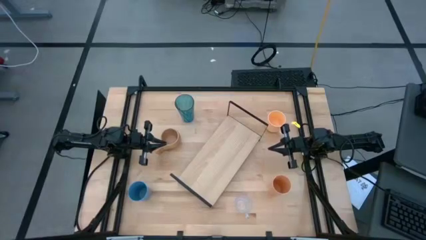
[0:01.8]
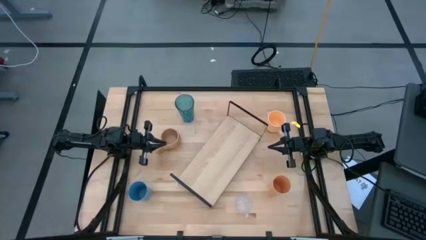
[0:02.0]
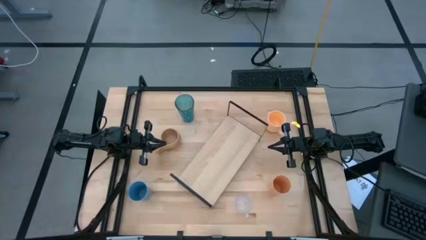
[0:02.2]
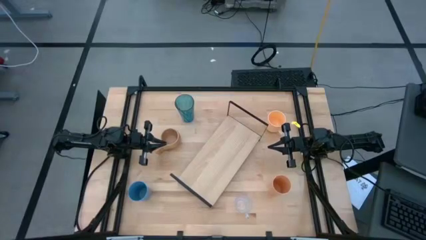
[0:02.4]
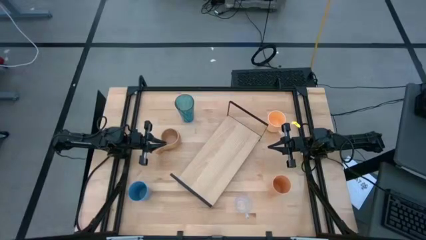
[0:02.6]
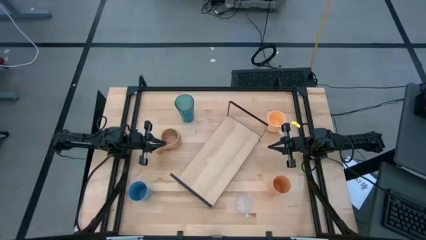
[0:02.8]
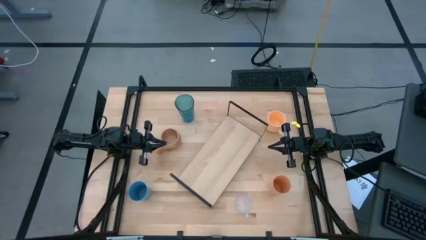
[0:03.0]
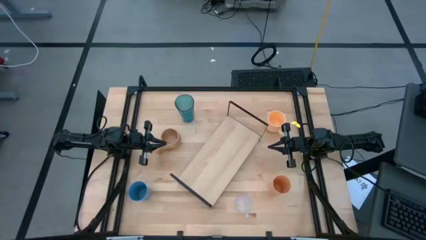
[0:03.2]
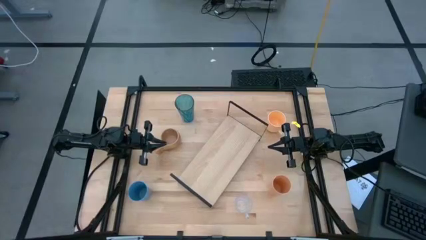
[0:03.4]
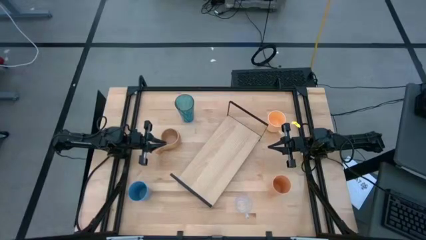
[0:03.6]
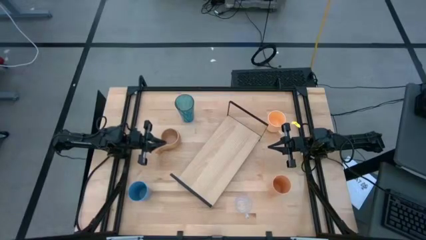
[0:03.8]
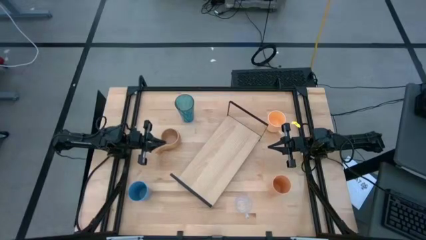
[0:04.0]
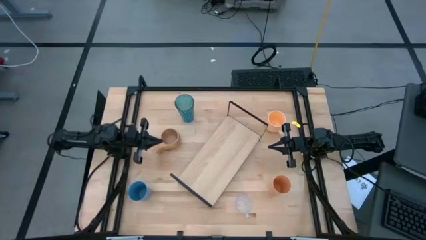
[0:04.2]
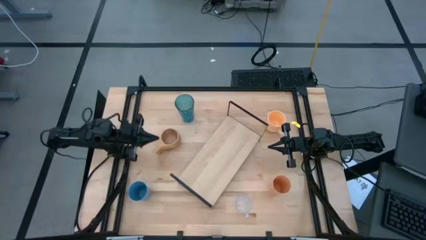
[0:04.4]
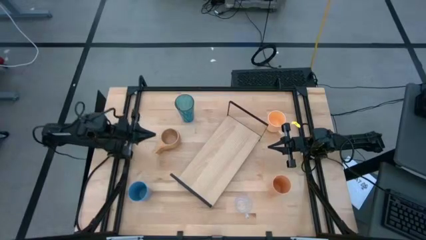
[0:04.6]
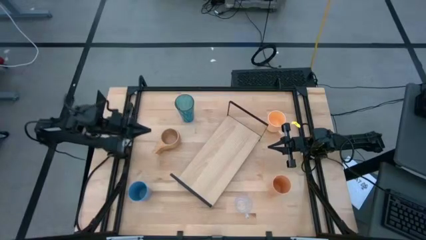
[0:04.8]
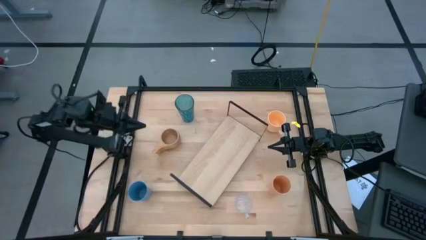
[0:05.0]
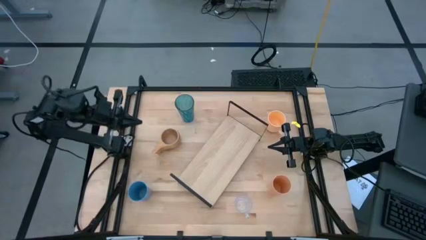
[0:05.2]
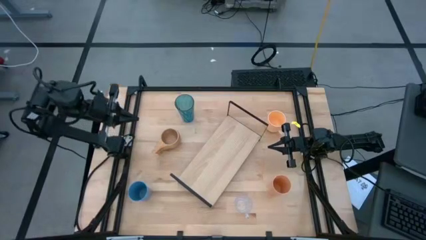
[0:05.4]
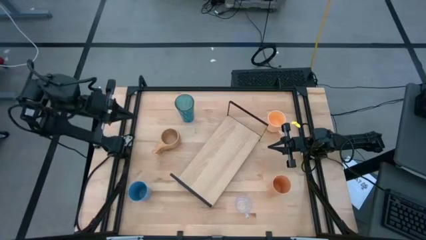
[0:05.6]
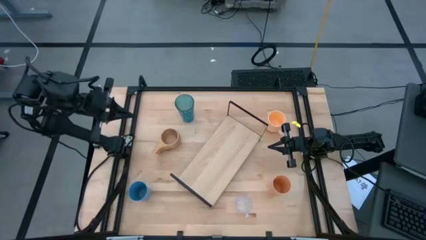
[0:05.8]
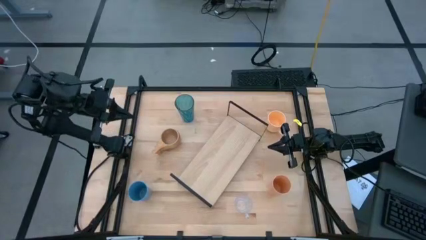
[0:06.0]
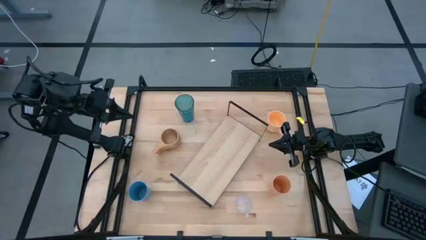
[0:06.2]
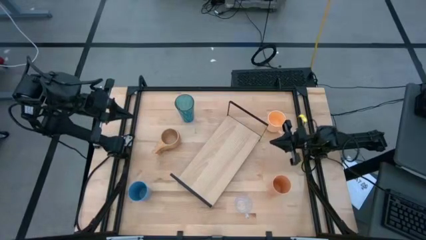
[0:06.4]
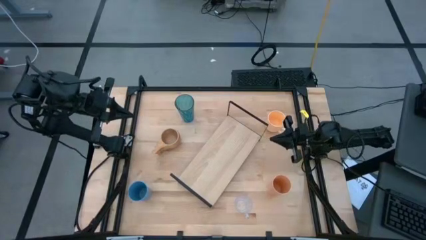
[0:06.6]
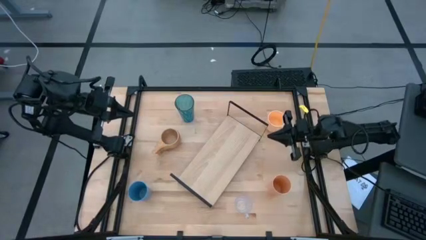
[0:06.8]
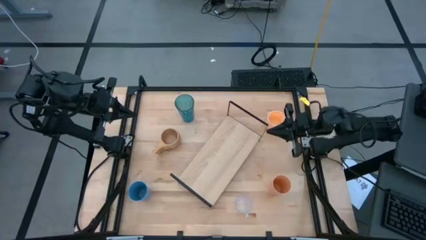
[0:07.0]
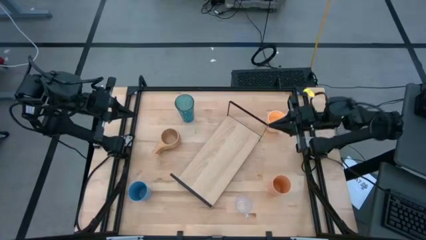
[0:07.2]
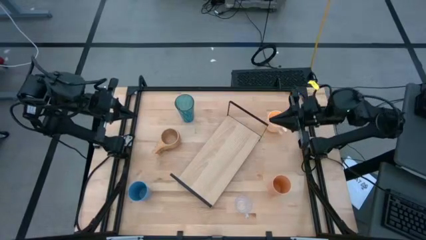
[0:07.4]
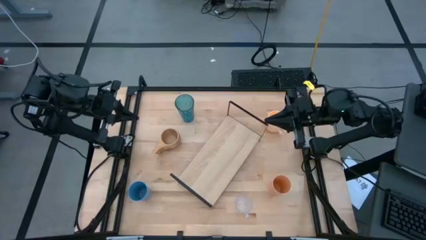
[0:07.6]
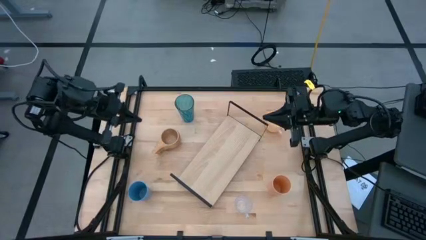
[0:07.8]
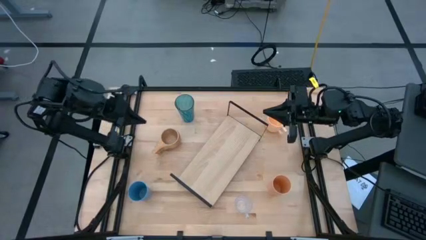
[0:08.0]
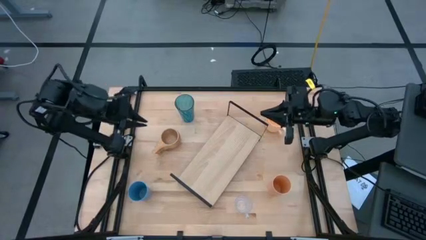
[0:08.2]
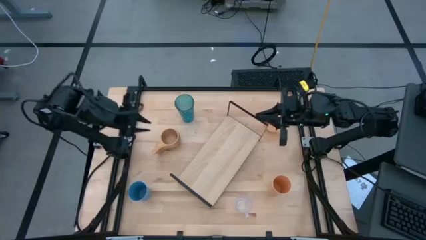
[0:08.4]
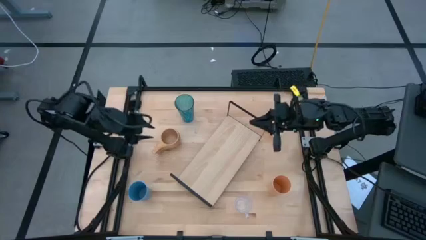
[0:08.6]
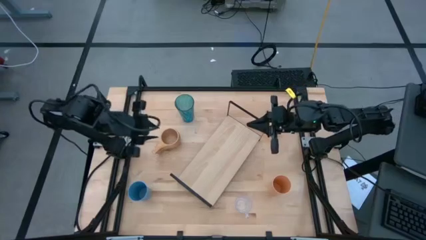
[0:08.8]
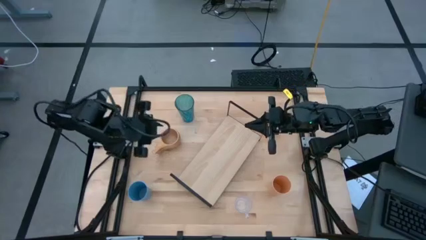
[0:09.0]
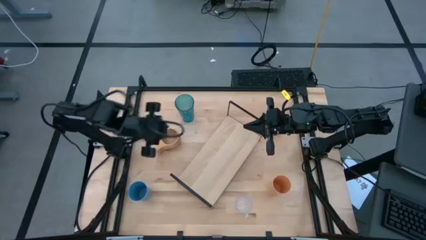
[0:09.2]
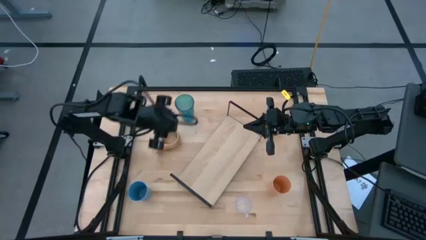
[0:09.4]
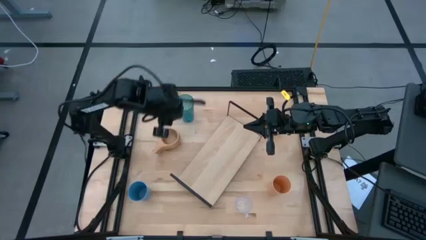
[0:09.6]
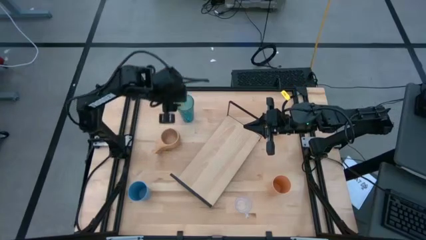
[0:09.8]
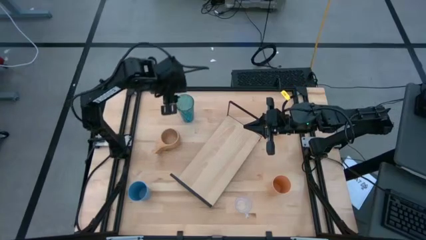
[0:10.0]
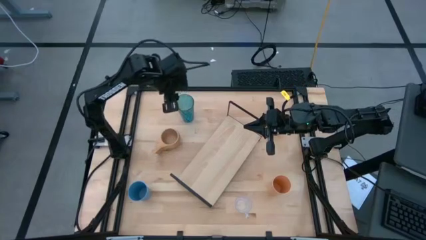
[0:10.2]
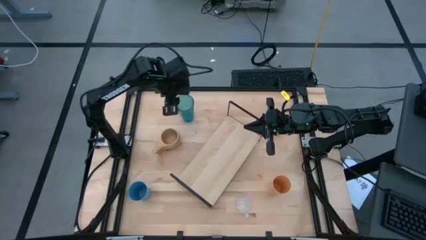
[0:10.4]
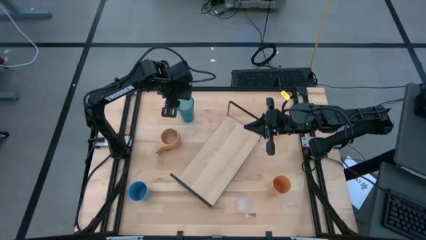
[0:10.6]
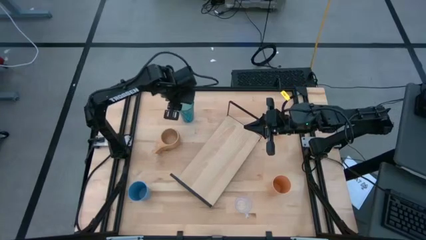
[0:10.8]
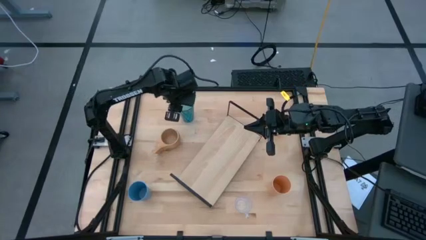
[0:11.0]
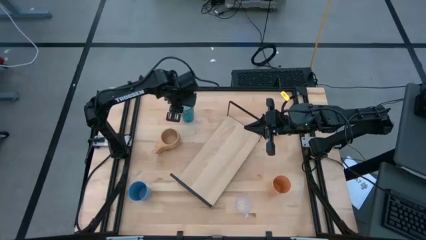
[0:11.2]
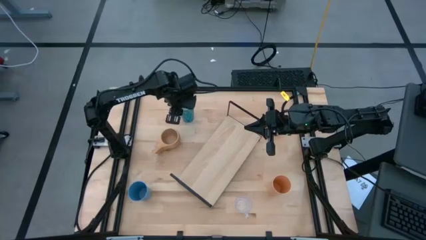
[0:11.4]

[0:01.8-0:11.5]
Task: Stack small to large cups/mugs on shelf
Put the top blue cup on the shelf

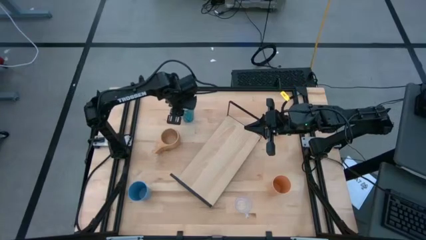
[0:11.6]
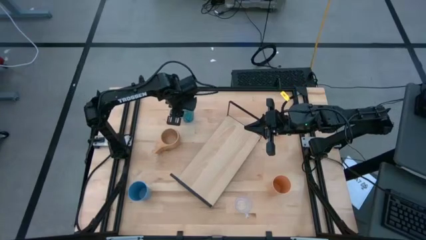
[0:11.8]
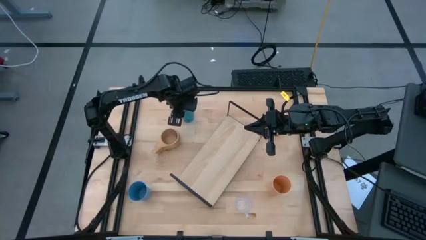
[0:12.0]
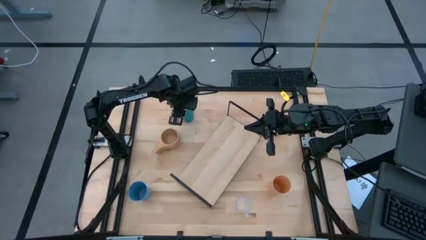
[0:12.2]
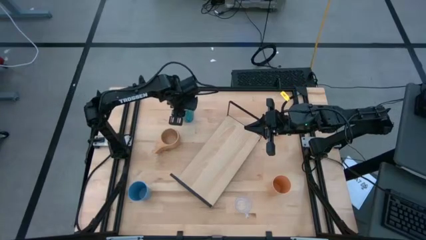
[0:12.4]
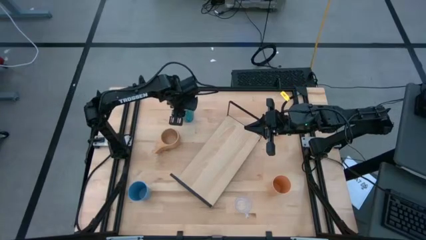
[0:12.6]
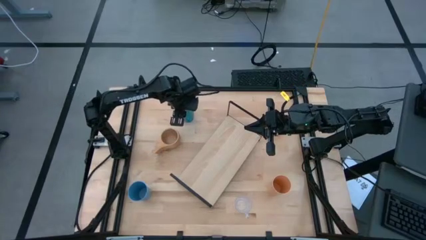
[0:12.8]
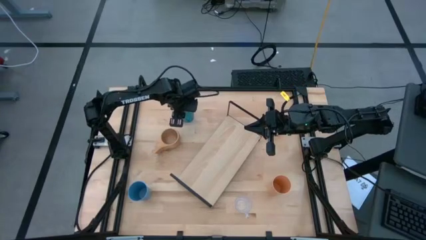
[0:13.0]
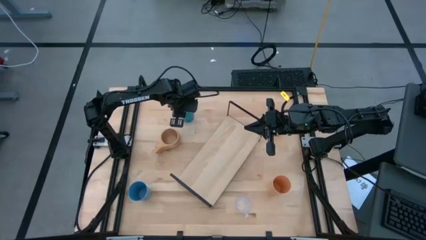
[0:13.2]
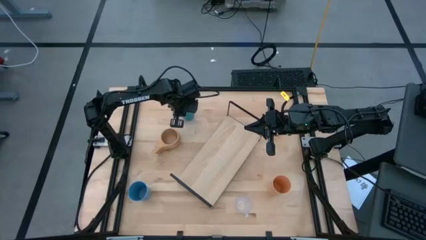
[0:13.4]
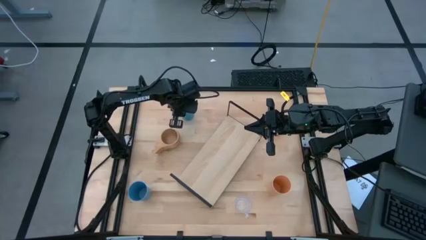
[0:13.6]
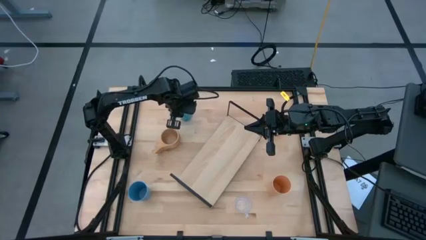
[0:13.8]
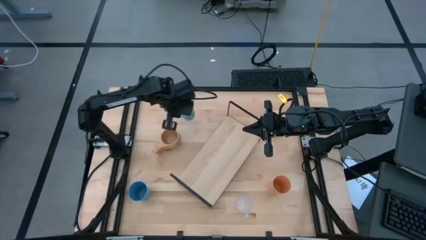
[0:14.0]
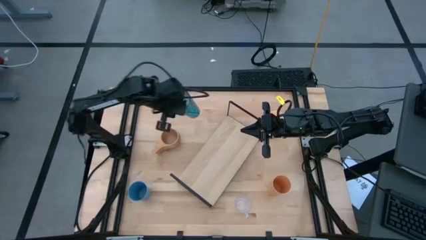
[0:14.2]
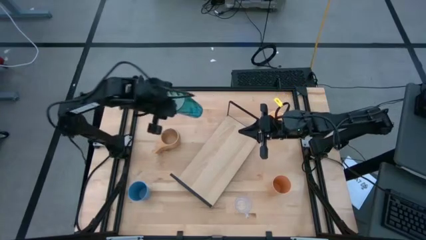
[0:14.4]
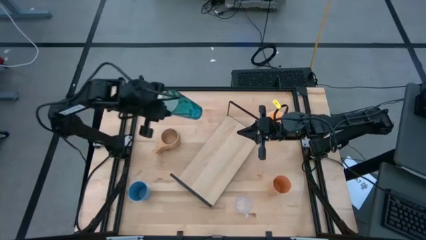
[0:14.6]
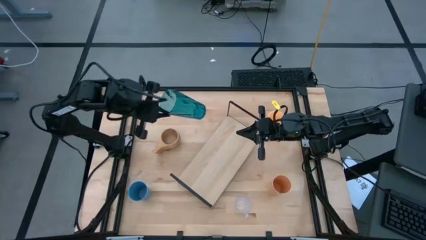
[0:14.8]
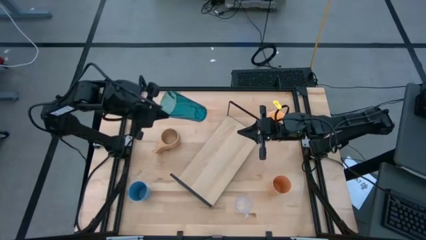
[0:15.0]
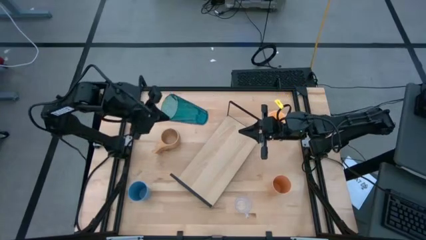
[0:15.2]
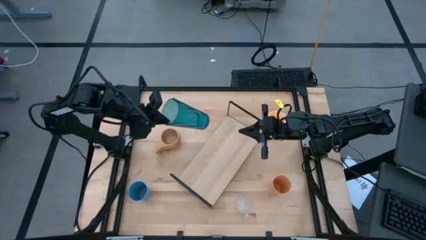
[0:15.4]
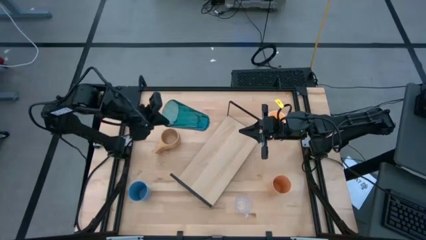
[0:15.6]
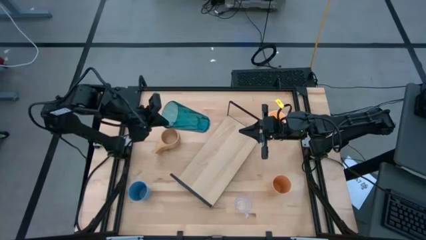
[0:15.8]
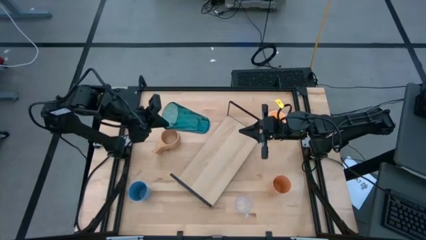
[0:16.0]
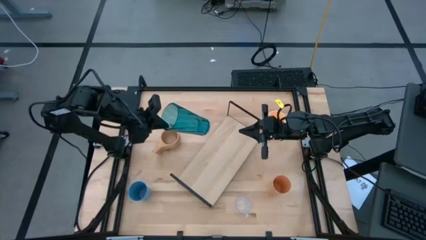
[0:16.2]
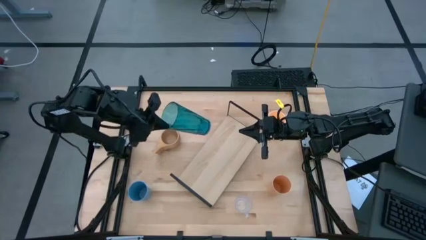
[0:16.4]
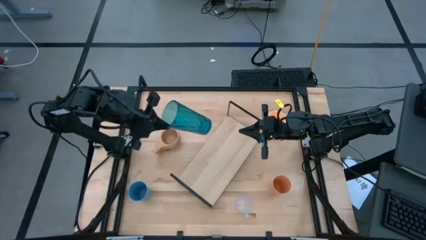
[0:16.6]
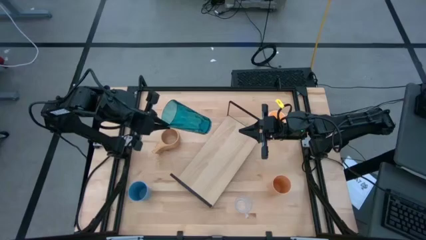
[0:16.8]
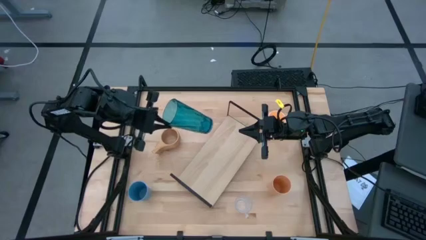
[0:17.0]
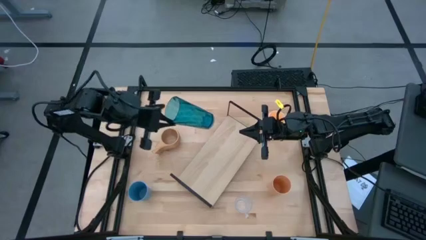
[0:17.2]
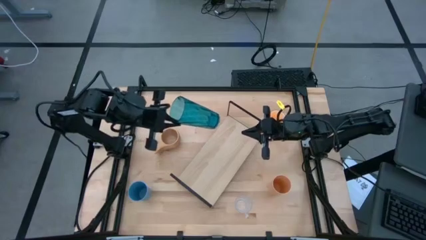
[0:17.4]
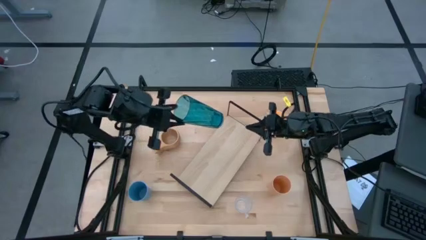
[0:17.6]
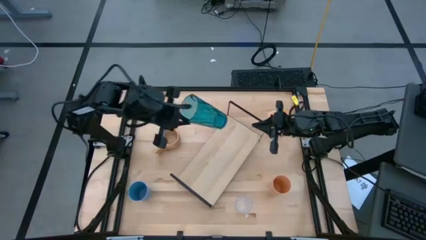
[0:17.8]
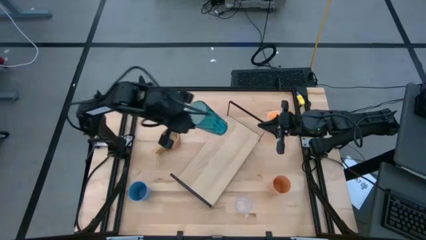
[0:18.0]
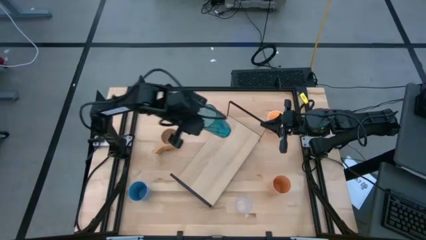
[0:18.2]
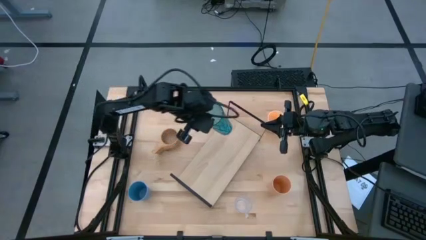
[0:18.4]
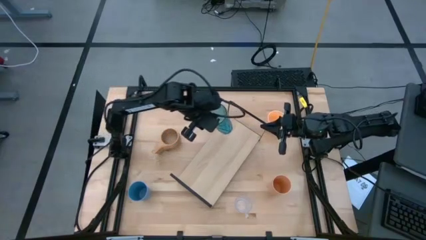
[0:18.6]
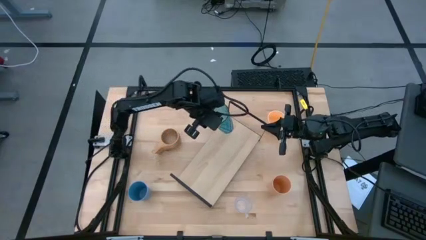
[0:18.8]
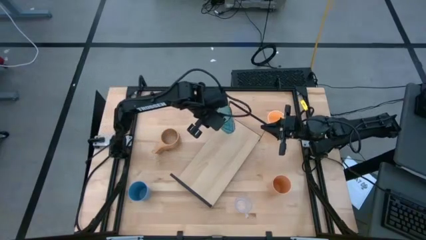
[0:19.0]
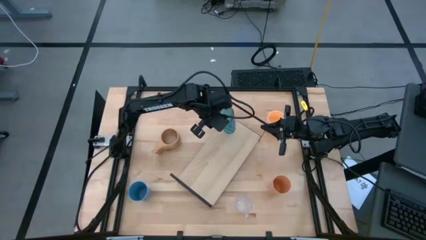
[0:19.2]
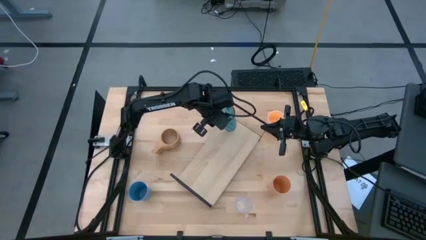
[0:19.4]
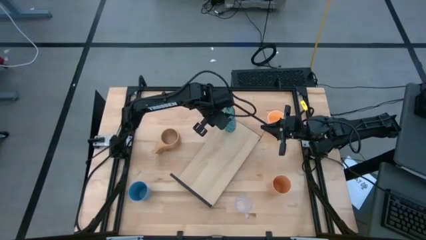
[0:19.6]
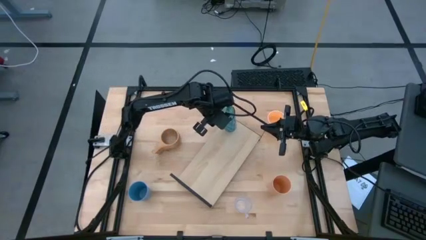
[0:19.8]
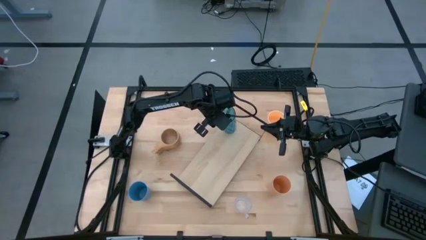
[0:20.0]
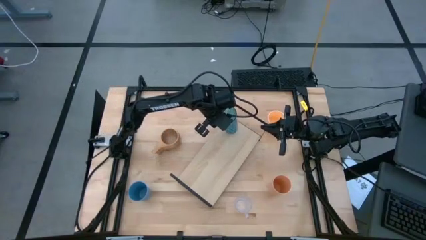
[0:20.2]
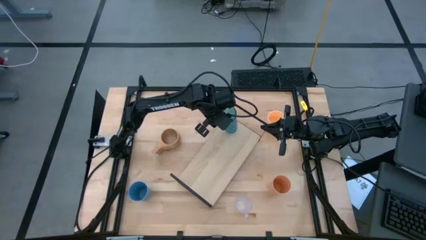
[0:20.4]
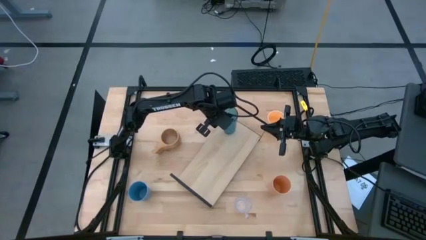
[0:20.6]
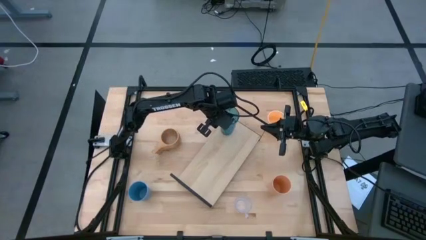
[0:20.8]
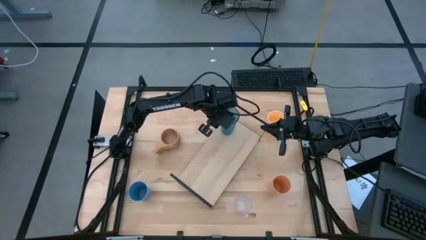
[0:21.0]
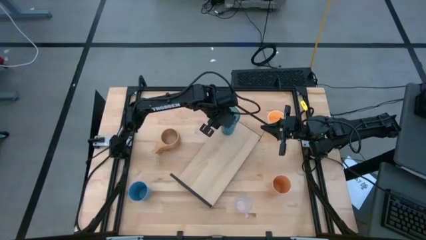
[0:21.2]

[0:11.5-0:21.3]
Put the top blue cup on the shelf
